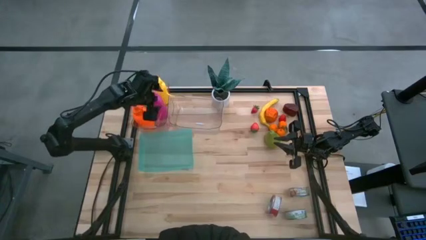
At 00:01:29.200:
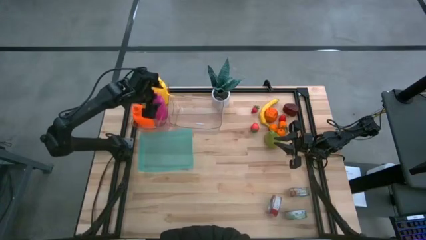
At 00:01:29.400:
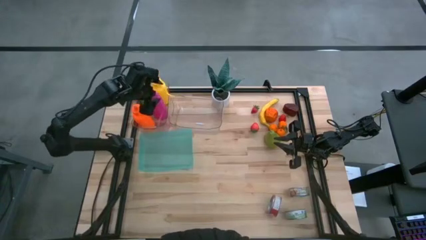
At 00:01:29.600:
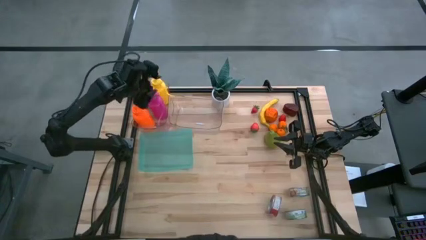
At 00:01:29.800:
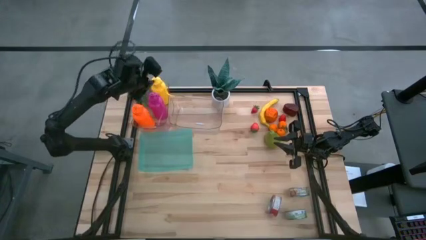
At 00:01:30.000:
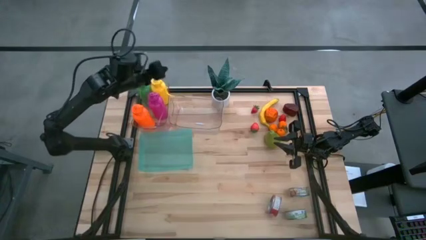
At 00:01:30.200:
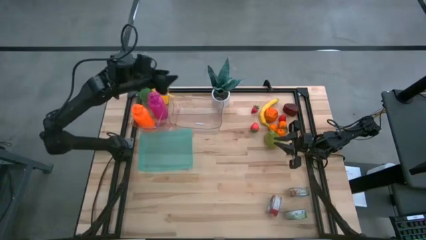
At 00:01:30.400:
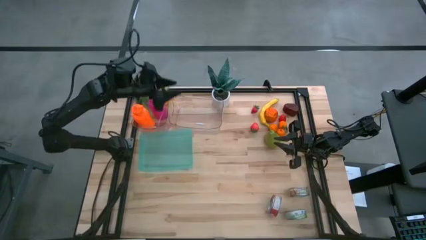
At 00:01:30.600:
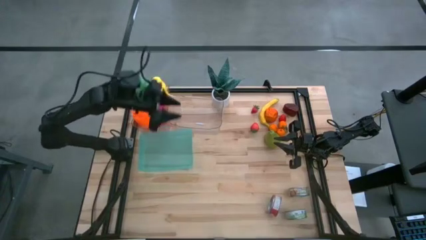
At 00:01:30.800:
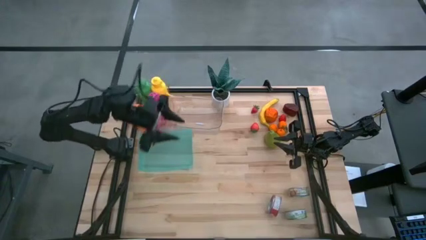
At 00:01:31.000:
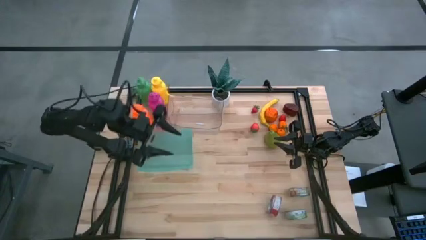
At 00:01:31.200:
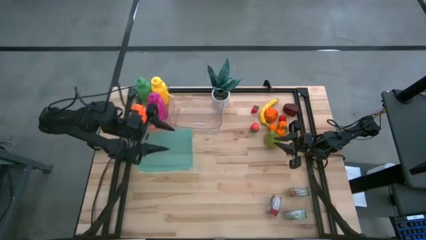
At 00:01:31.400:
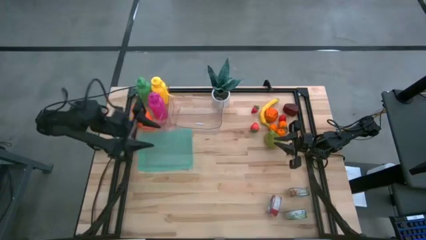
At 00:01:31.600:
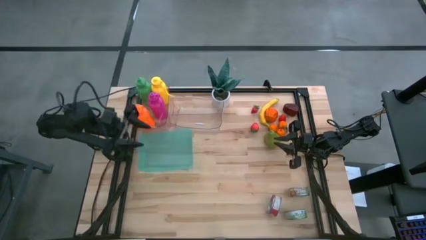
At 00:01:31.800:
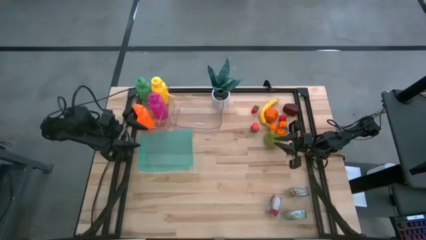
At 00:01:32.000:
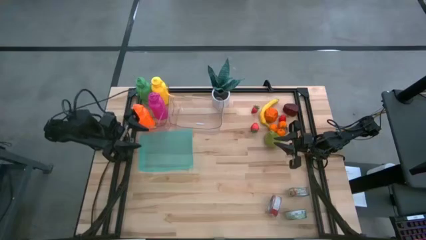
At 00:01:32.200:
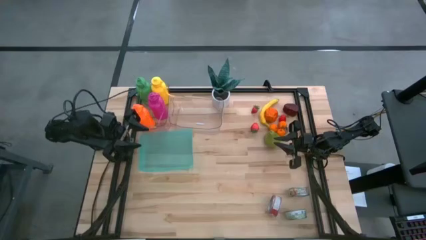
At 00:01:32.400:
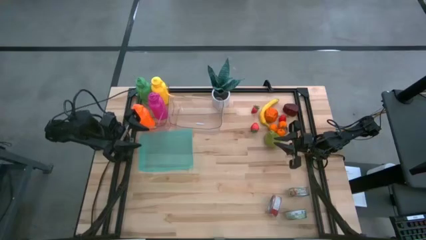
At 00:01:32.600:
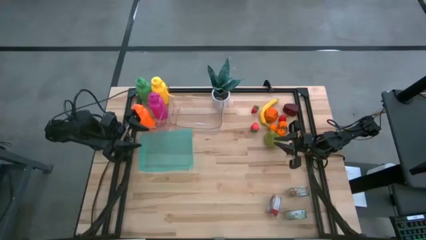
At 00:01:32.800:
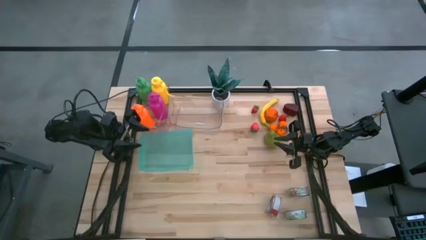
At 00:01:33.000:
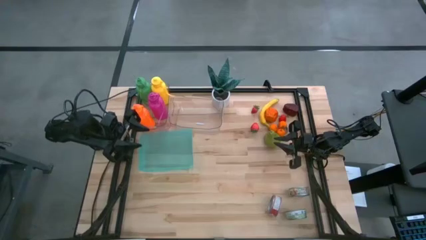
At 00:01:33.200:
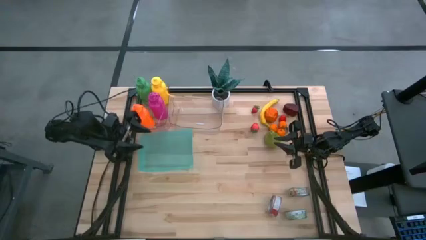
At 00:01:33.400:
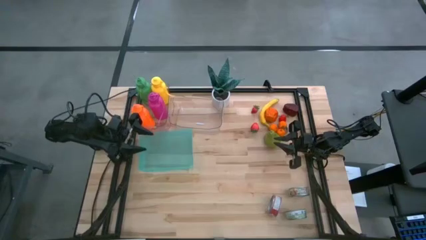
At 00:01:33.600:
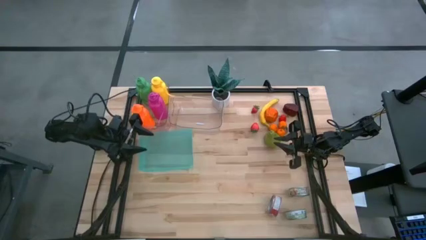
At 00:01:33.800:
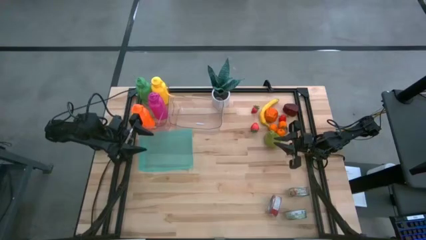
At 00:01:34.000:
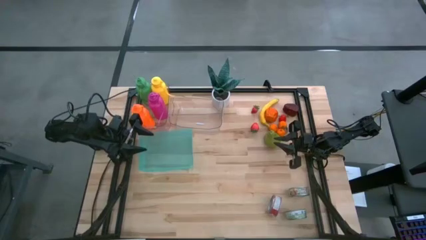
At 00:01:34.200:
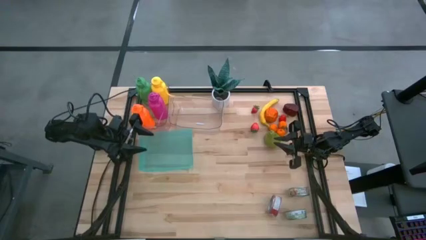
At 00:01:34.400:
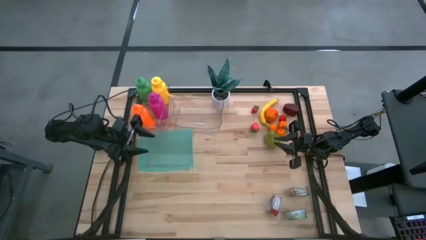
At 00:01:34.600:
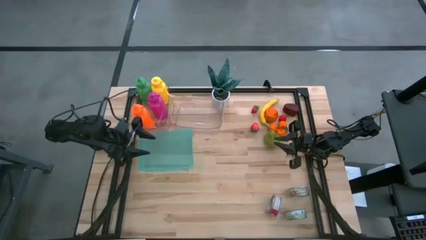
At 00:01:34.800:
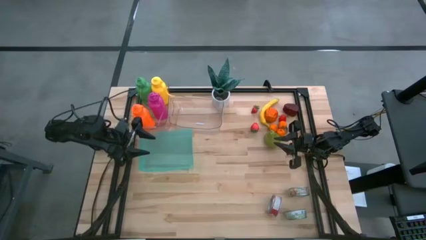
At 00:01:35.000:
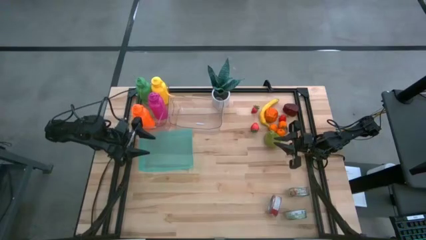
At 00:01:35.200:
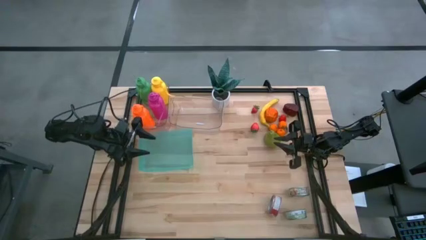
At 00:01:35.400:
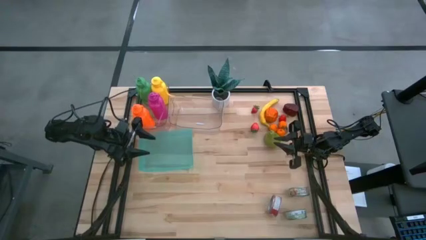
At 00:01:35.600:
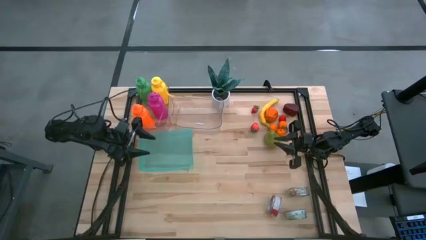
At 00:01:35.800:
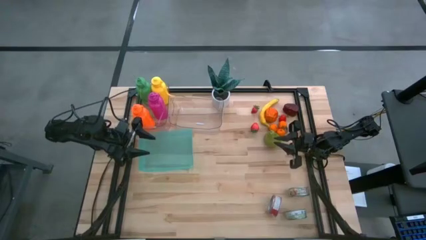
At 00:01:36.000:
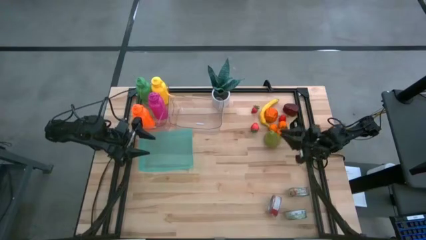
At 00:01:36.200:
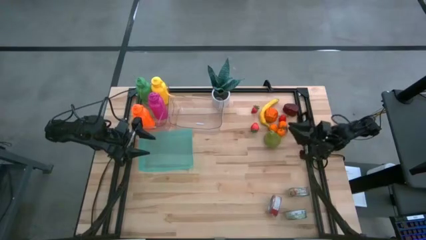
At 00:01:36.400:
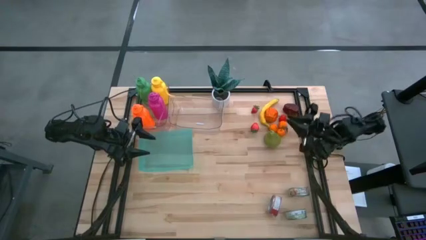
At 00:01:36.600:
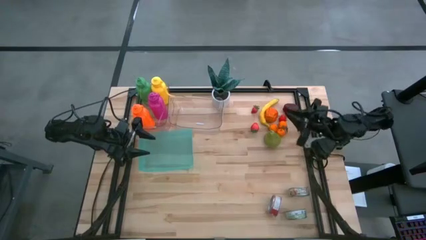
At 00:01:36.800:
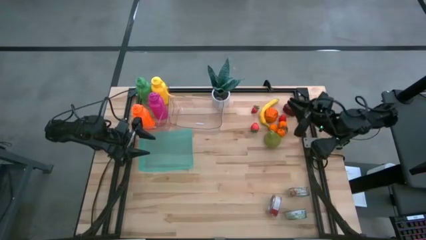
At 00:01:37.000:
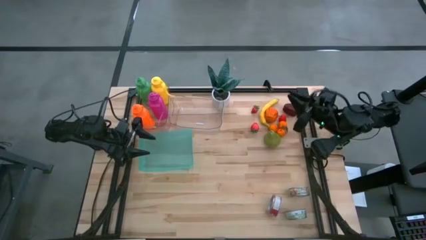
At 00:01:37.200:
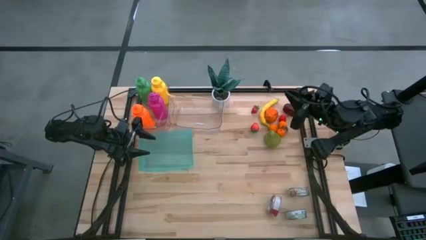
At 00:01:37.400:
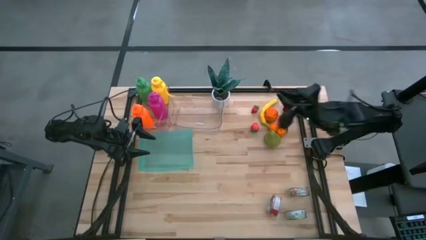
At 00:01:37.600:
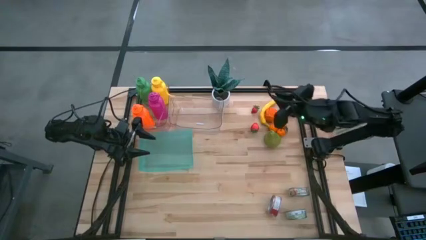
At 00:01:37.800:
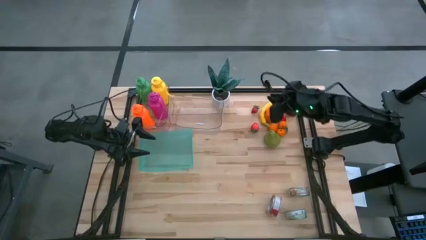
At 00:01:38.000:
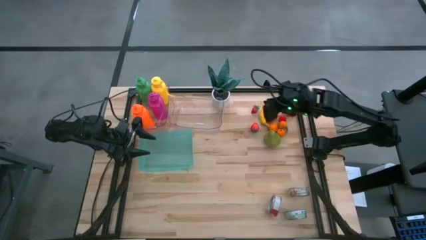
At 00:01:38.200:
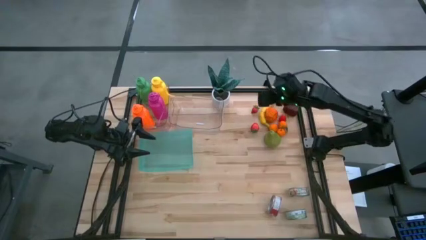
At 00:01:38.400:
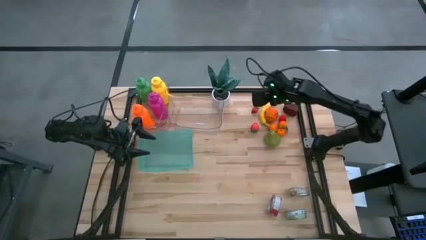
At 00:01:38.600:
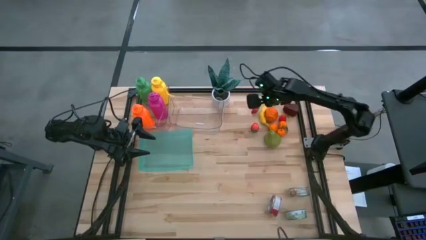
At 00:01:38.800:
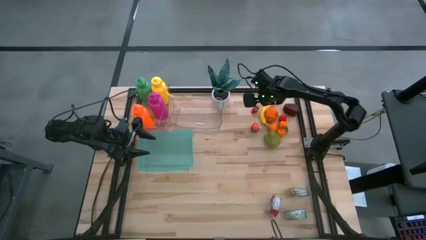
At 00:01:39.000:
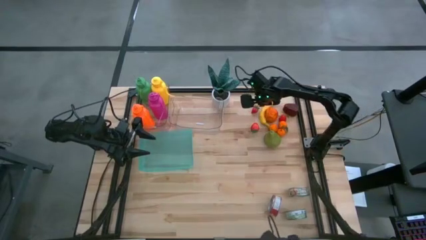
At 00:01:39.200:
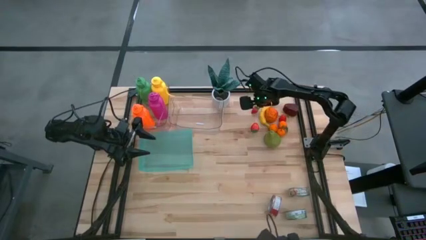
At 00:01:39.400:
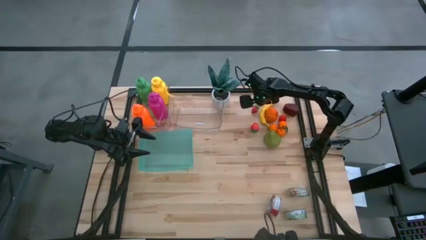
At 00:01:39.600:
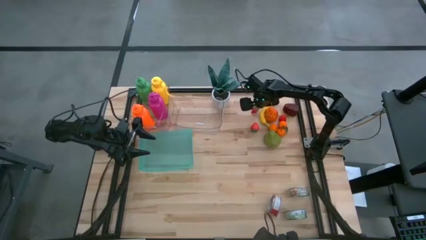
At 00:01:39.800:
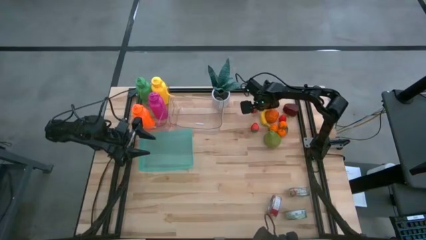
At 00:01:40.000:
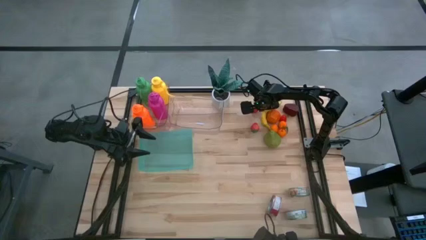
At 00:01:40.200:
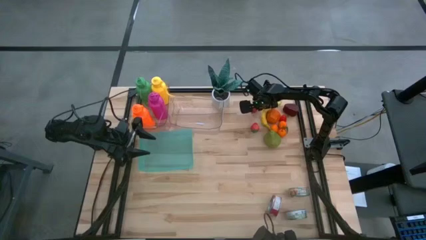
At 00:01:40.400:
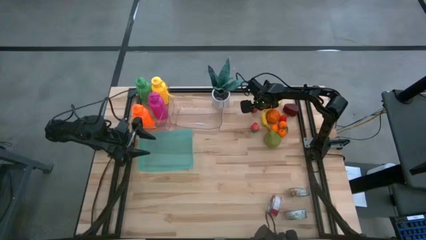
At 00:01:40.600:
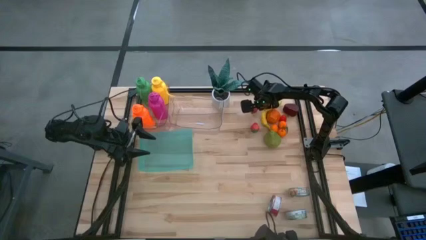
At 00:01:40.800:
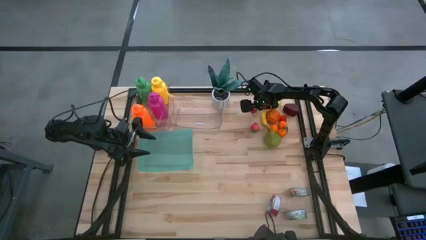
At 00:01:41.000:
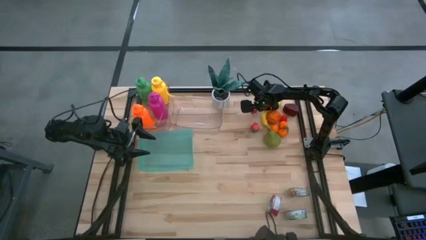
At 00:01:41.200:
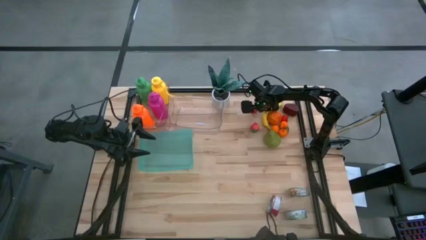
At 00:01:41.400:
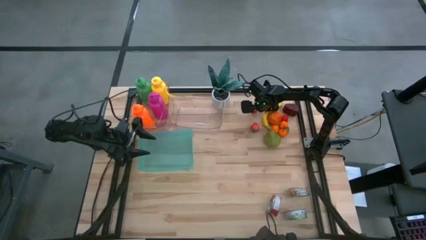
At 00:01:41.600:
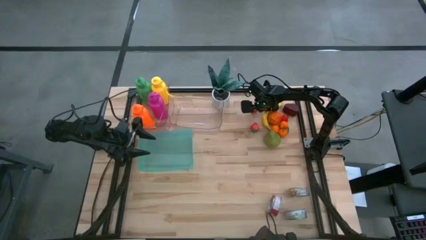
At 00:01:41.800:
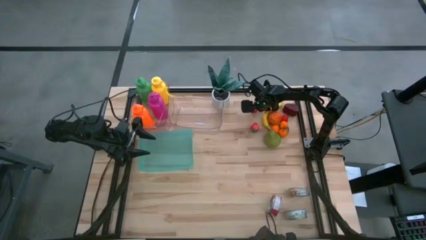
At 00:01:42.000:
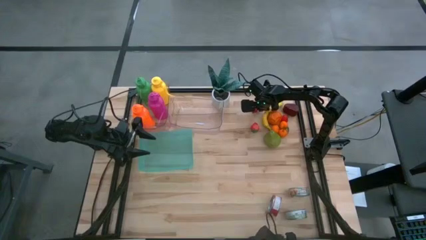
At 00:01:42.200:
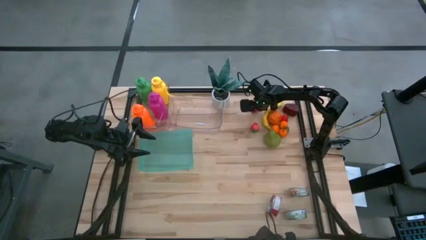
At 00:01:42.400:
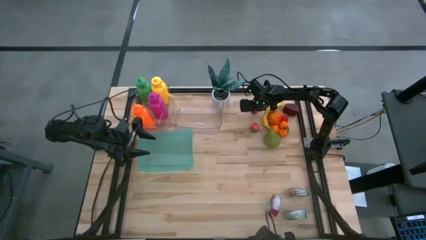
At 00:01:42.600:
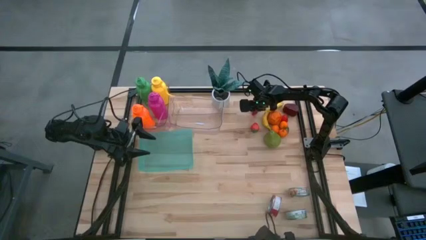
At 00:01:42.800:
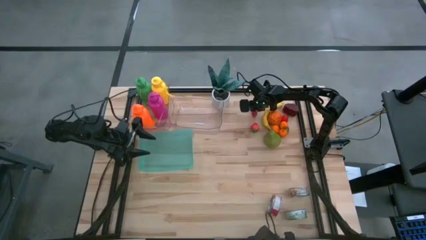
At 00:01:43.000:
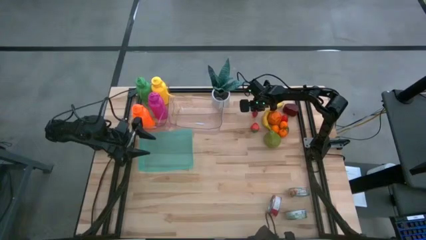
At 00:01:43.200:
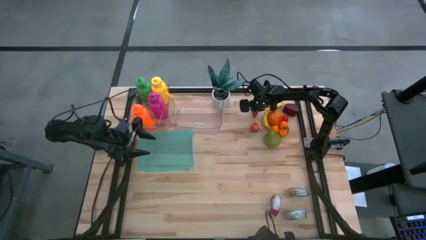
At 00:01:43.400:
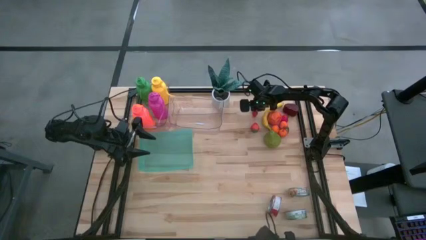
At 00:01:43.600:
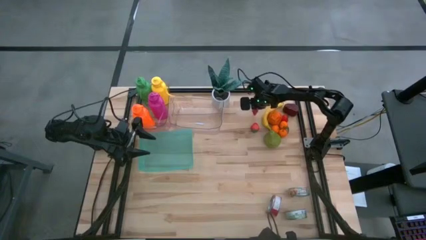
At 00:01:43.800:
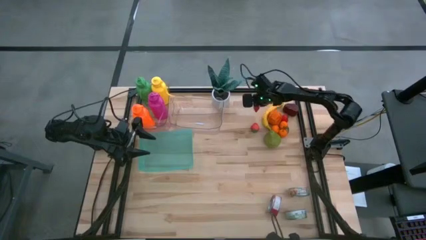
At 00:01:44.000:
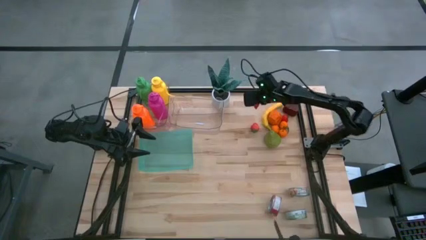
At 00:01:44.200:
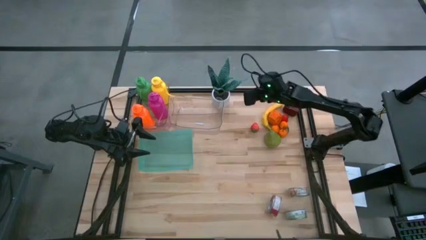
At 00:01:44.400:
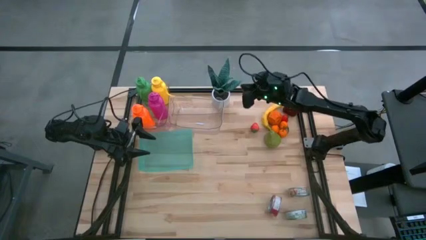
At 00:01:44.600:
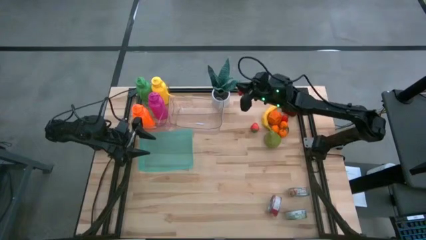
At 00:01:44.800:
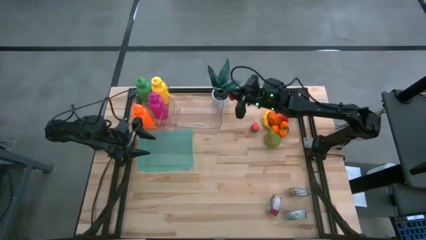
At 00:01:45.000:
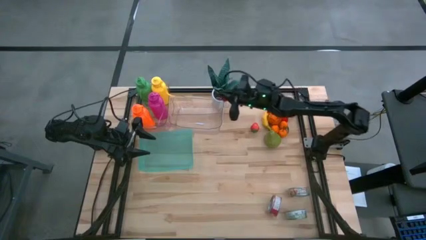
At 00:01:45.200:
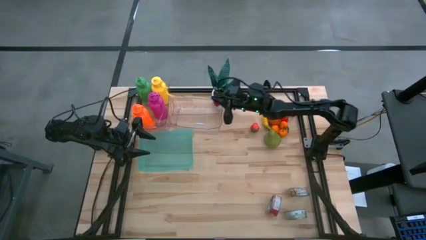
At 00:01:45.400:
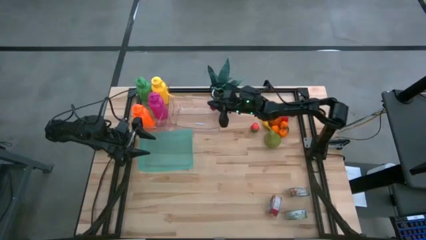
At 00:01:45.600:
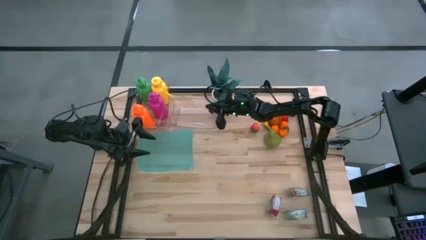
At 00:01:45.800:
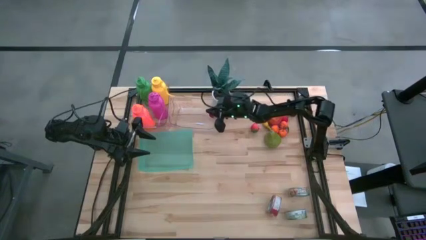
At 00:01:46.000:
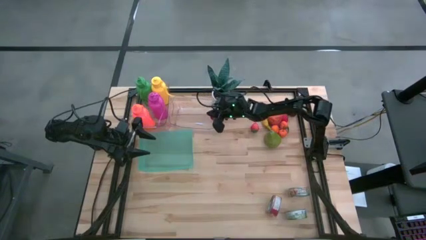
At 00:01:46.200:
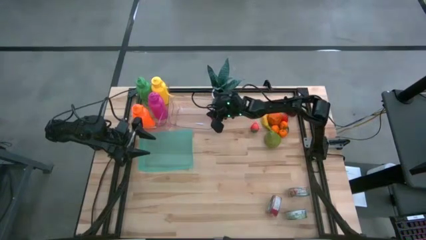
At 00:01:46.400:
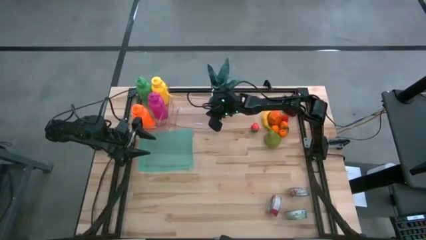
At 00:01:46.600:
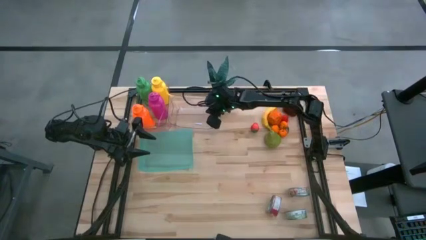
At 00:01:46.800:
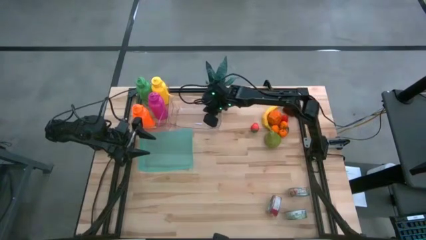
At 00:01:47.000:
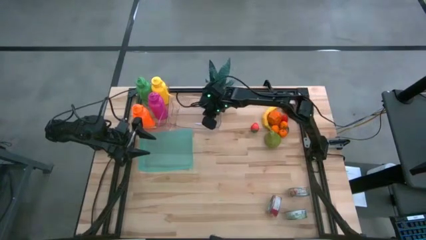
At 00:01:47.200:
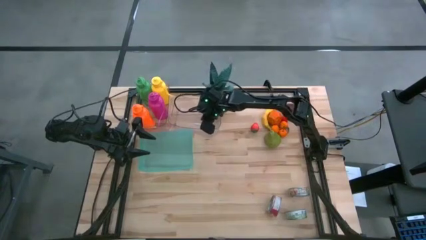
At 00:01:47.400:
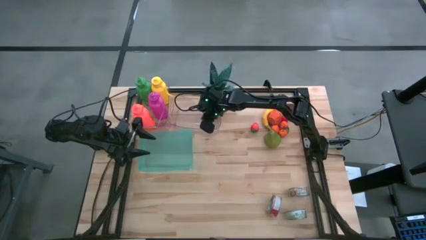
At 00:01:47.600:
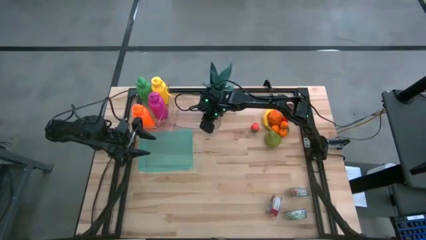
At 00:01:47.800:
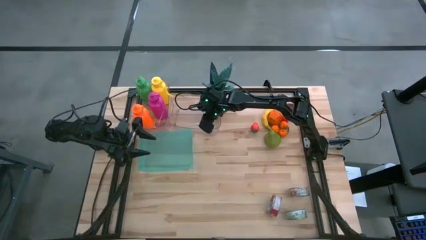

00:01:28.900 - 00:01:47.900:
Task: Pick & Place Food Item
Put the top red strawberry into the right transparent bin
